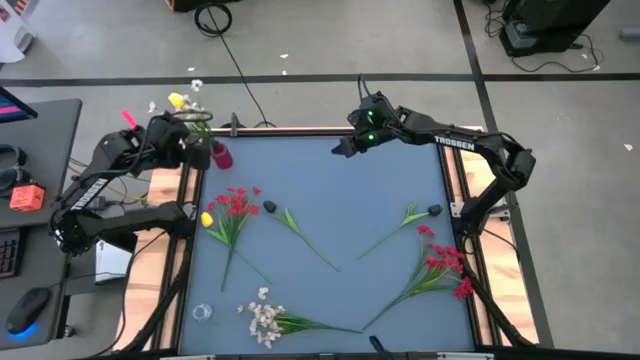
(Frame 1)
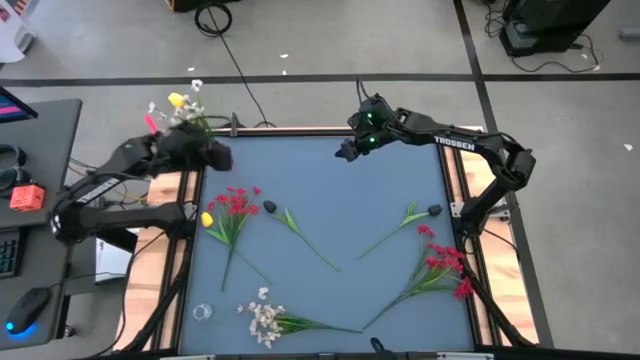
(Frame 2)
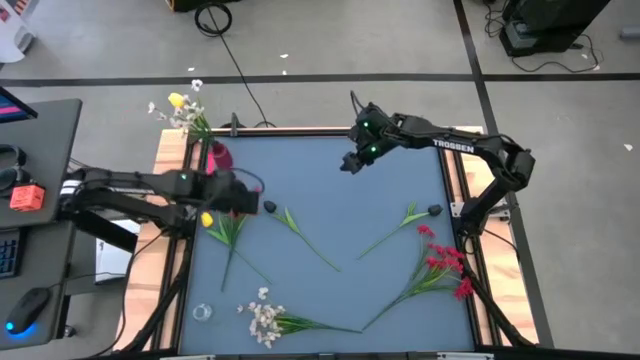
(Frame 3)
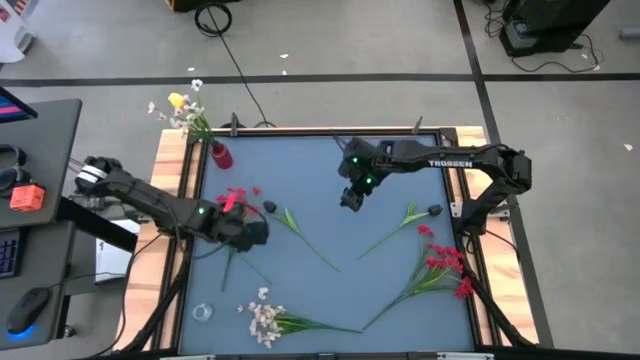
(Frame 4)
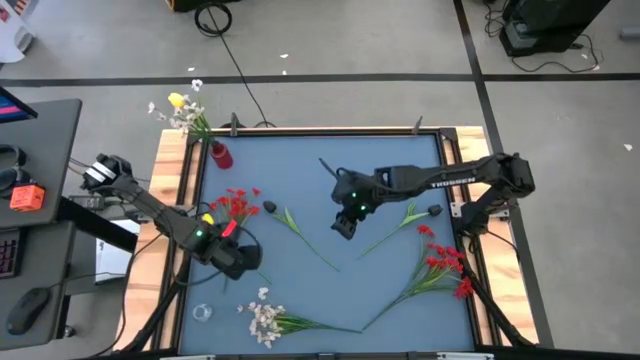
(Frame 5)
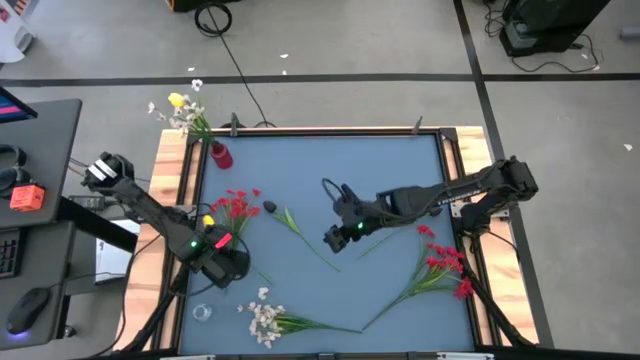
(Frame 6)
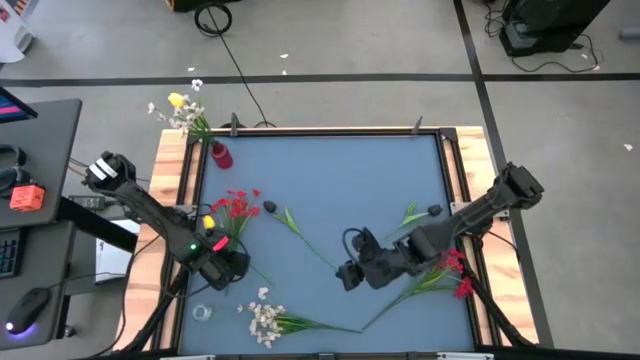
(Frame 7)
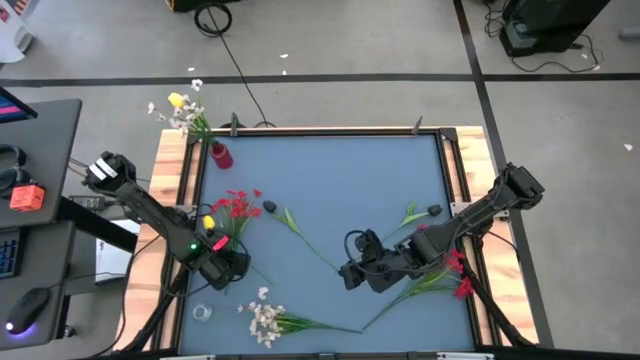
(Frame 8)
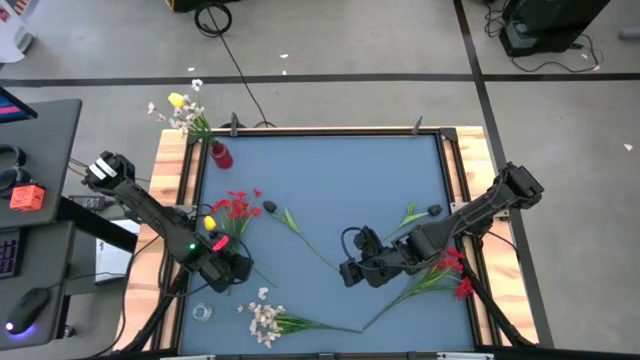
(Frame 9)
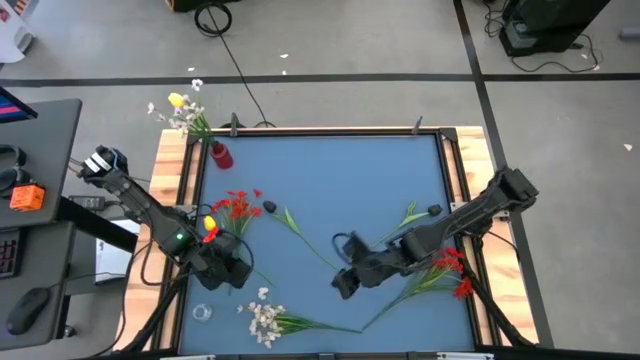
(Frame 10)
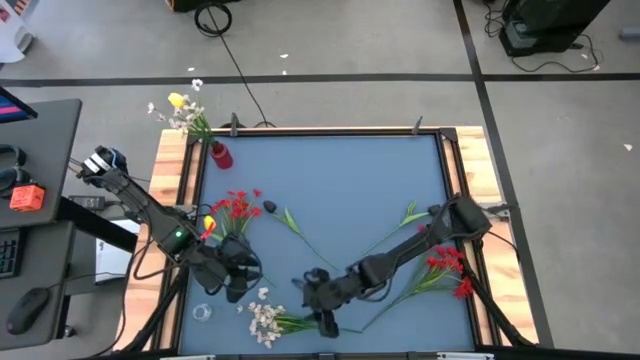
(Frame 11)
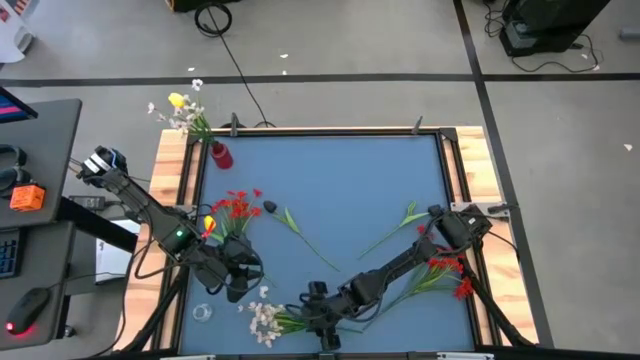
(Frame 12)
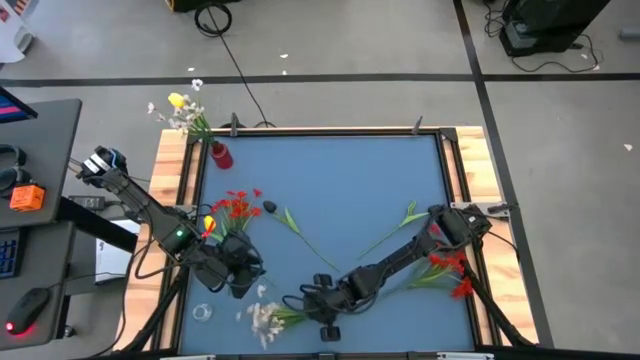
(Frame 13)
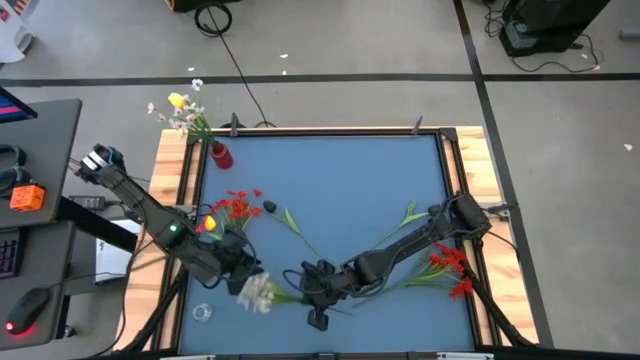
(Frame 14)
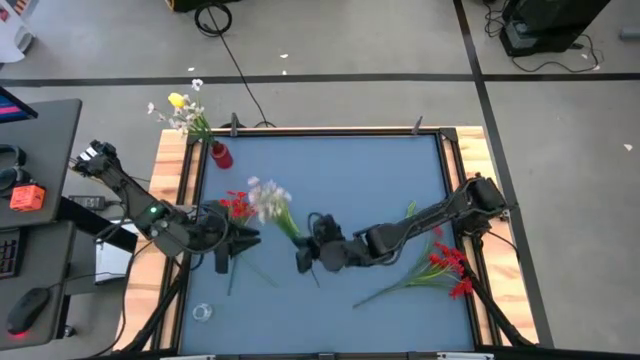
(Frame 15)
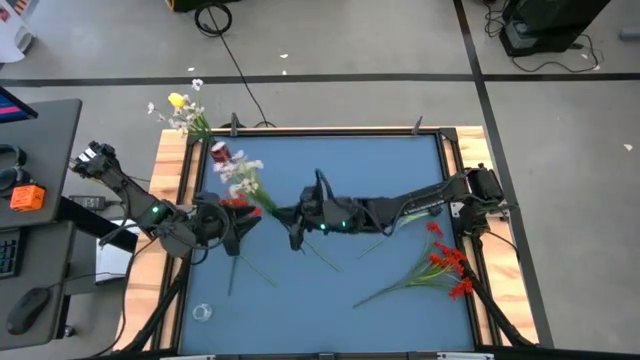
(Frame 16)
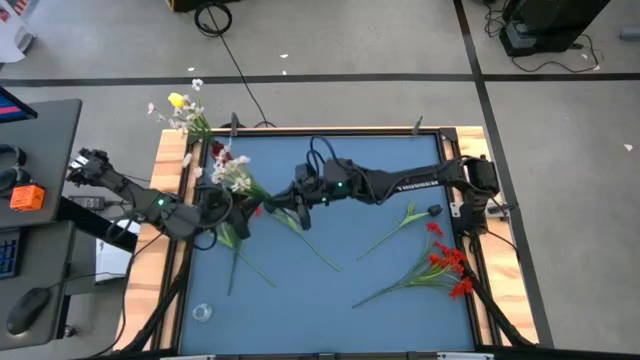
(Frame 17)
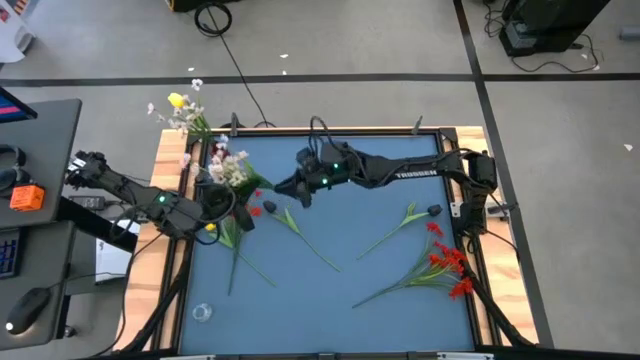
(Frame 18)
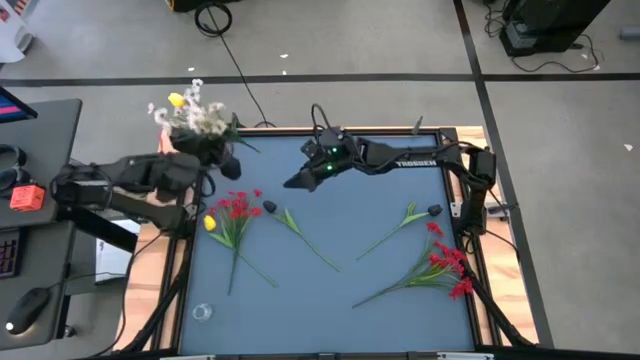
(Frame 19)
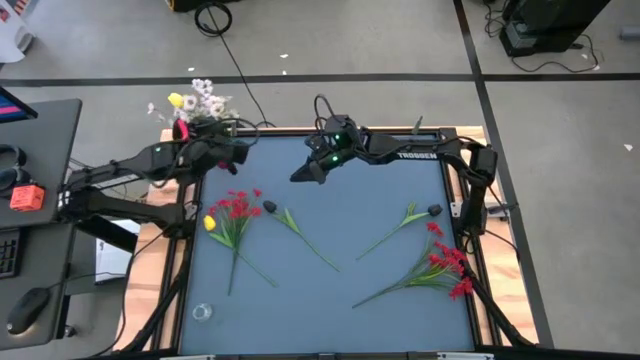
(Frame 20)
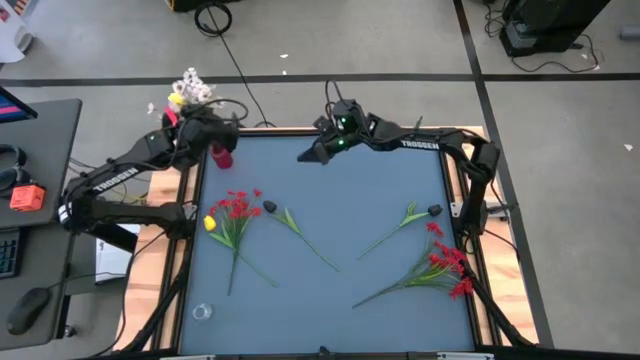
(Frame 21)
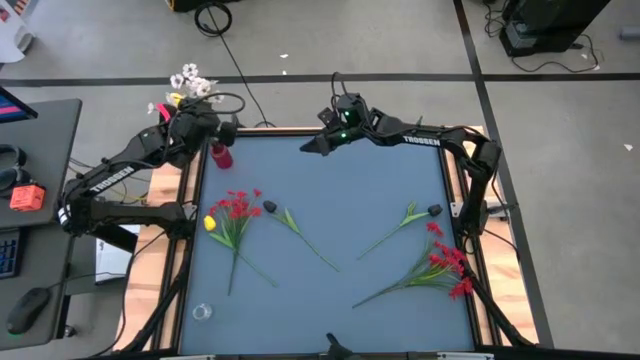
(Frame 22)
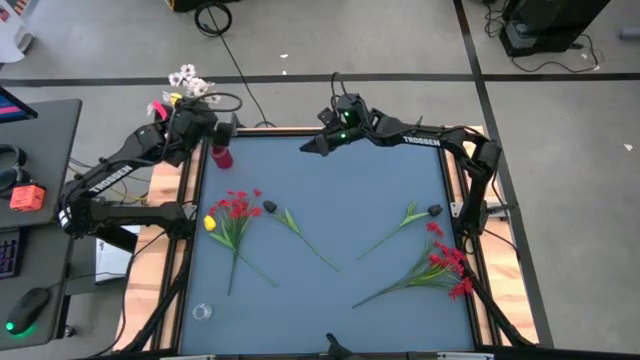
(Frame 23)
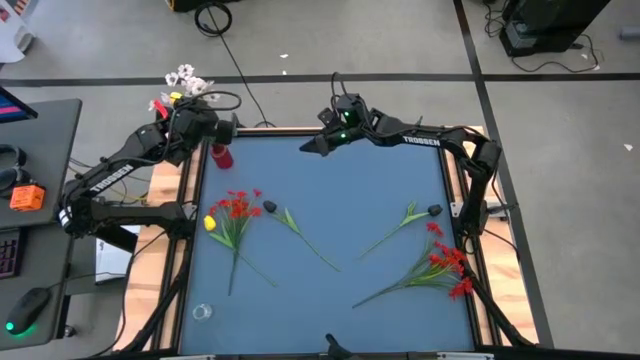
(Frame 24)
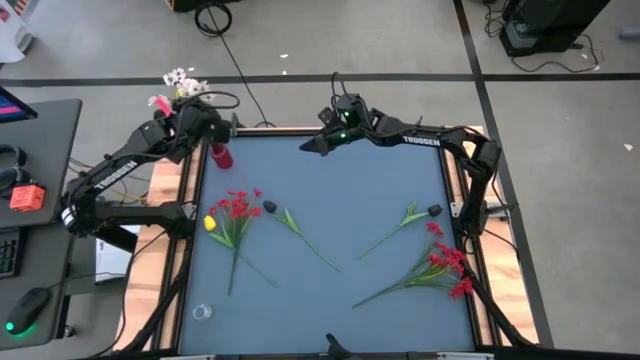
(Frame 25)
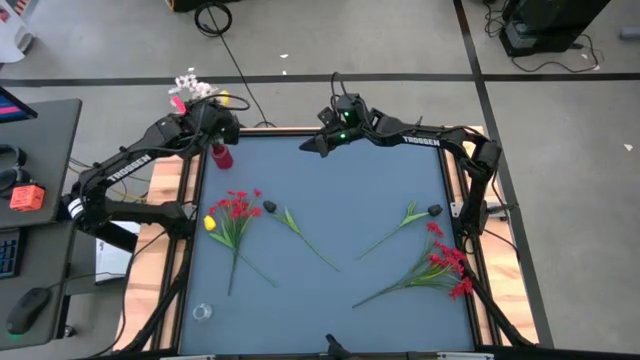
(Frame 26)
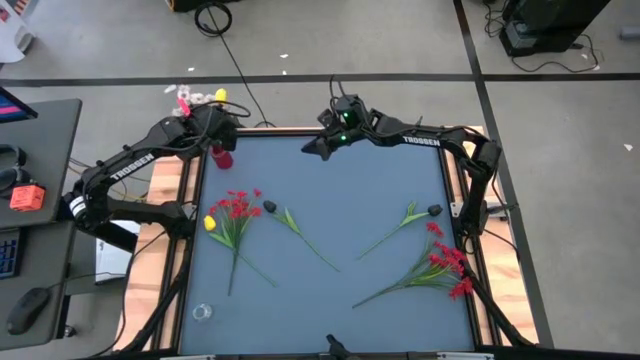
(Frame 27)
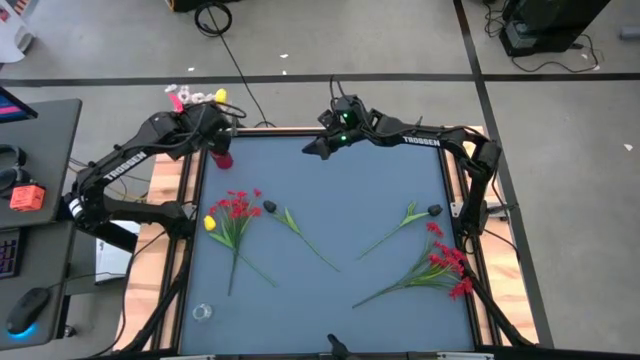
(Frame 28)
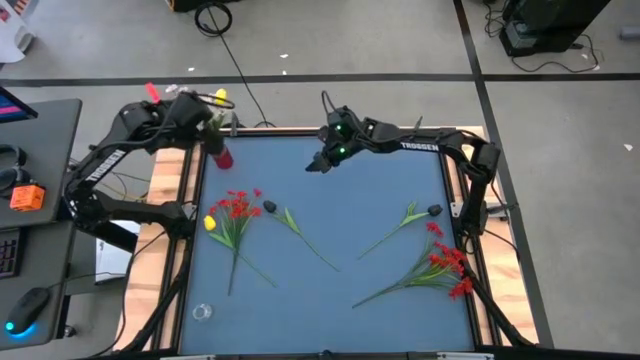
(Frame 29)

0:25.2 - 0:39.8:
Task: Sort flowers into vase by color
Put the white flowers into the red vase

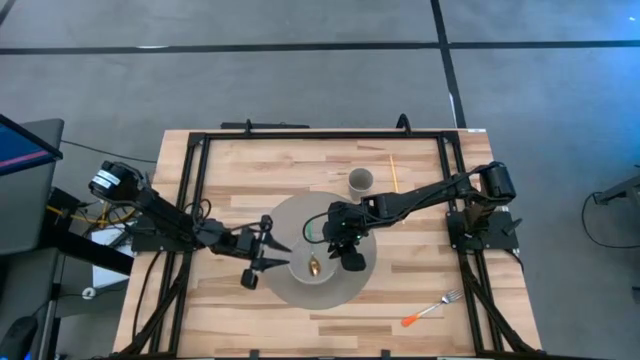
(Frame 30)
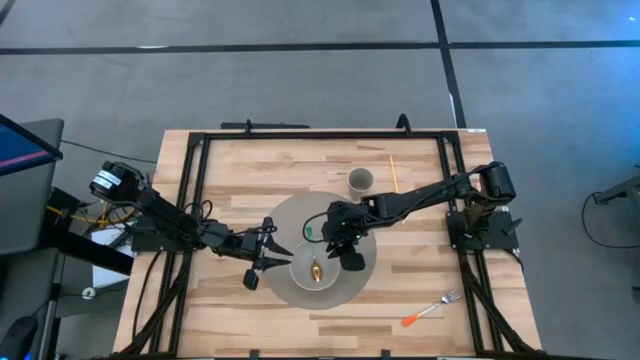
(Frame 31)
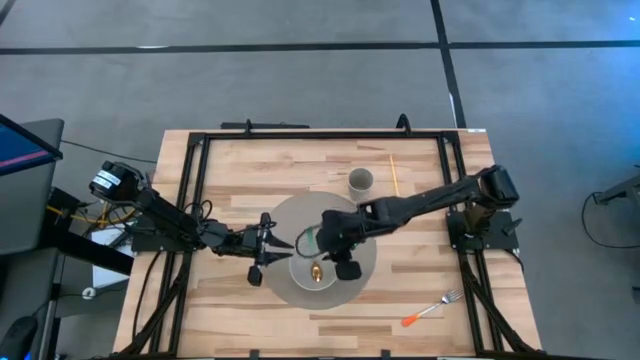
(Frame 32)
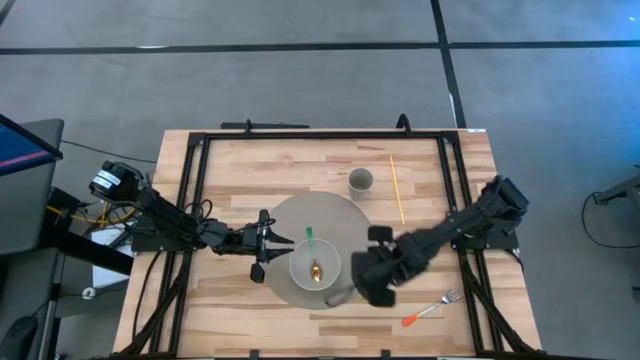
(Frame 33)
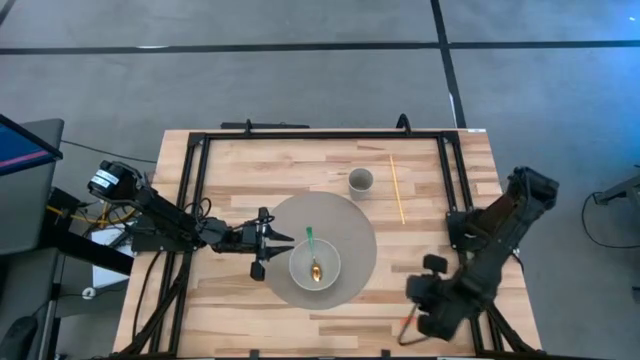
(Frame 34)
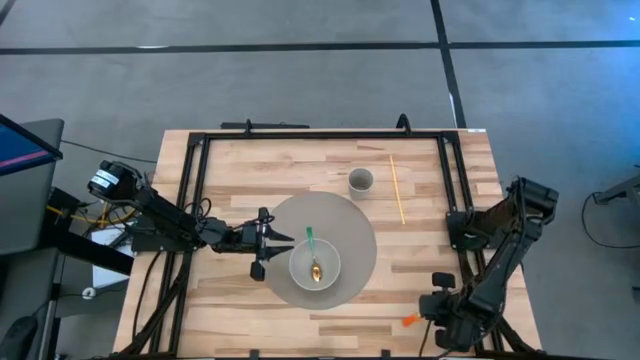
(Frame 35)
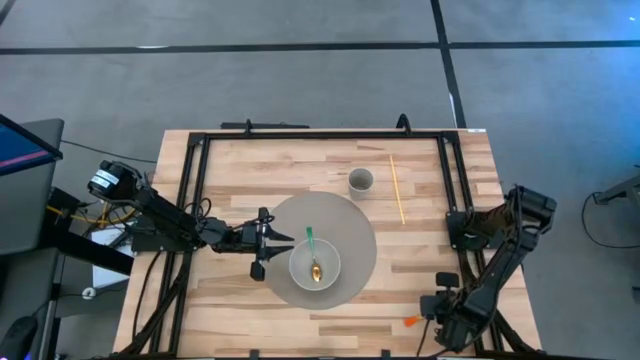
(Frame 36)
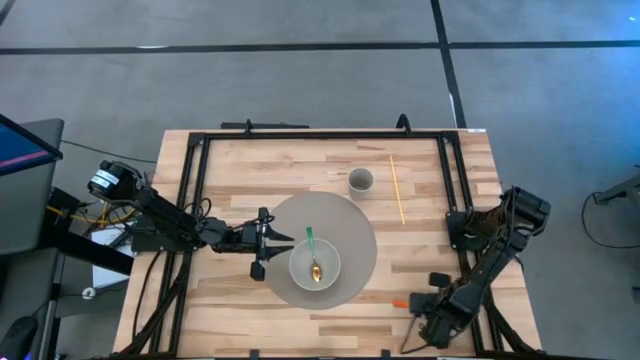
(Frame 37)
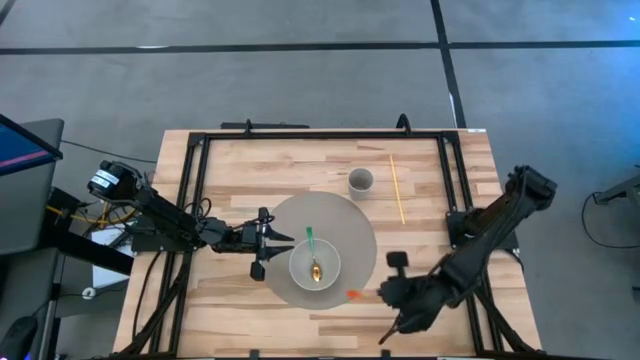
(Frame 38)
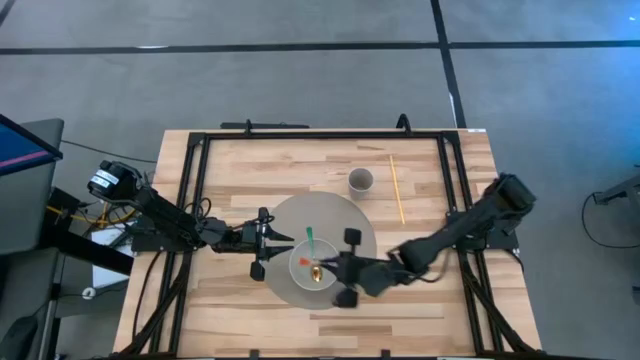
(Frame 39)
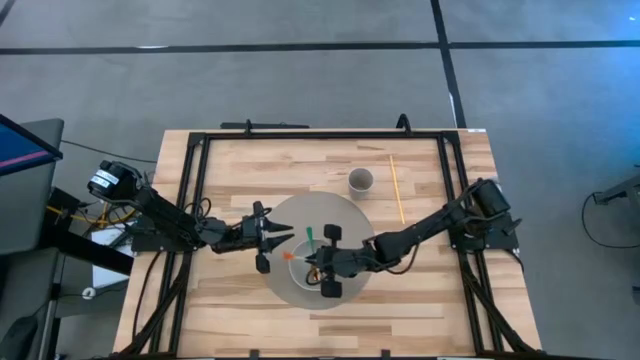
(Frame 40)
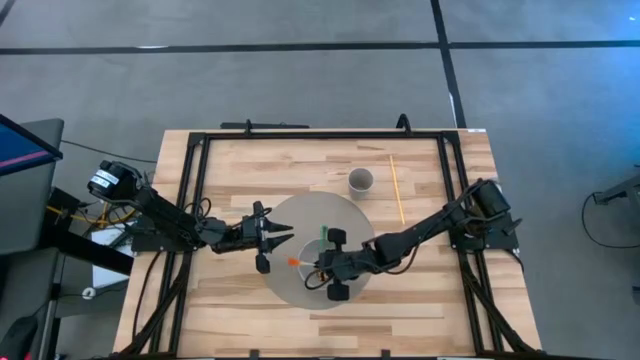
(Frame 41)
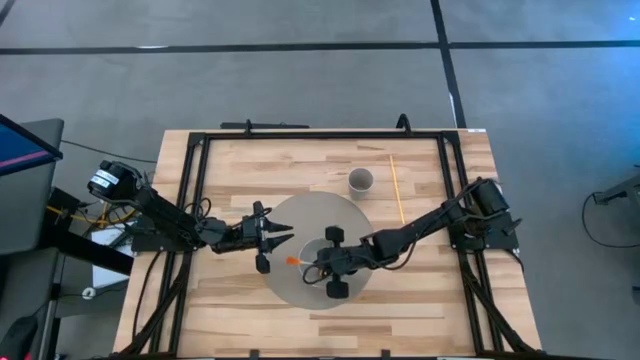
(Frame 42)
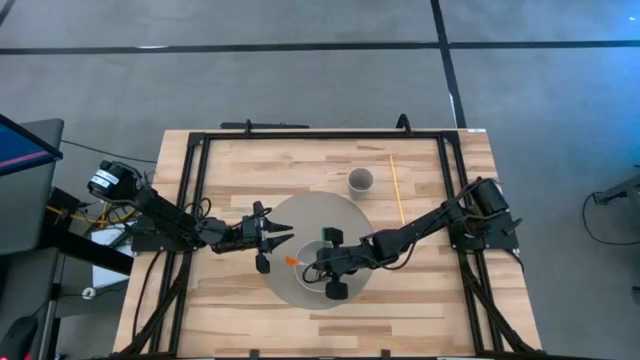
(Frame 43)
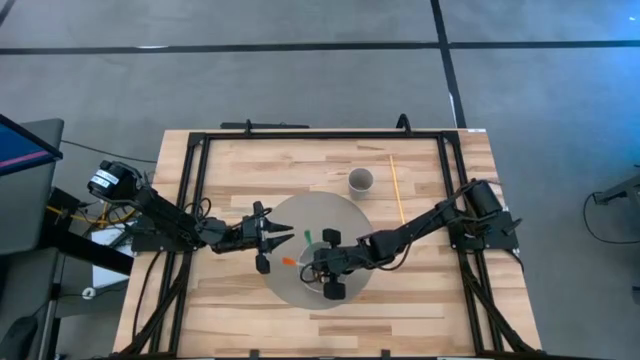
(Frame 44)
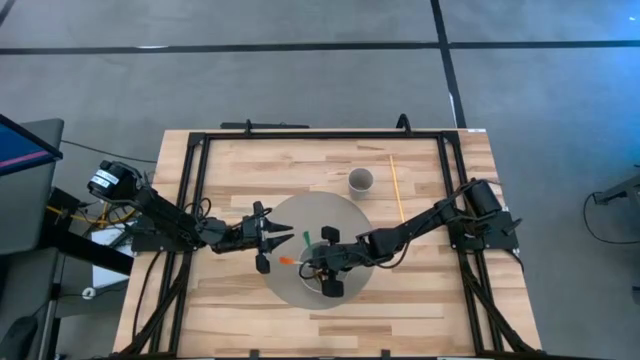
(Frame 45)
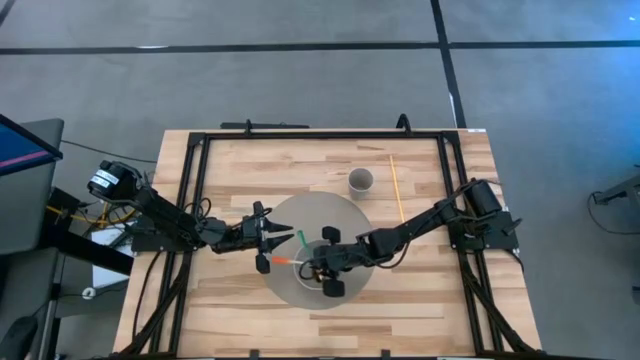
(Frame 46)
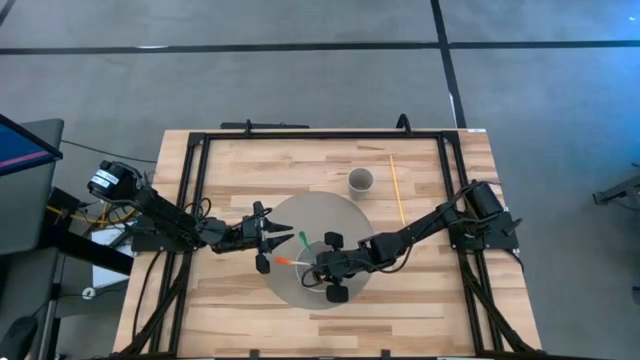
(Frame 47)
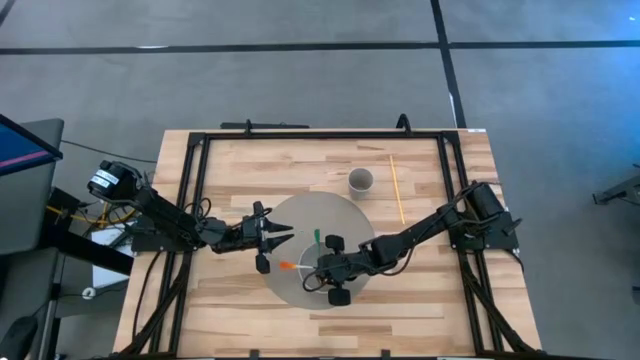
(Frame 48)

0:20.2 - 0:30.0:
Task: Pick & Place Utensil
Put the orange fork into the gray bowl
